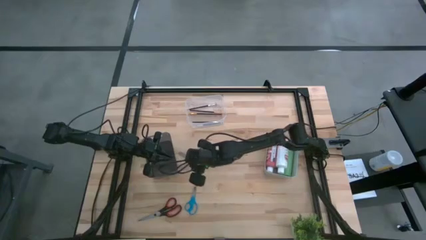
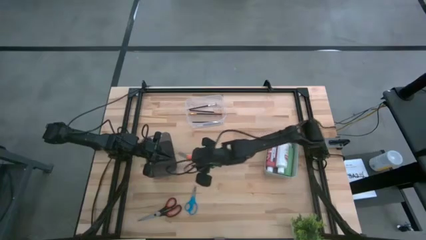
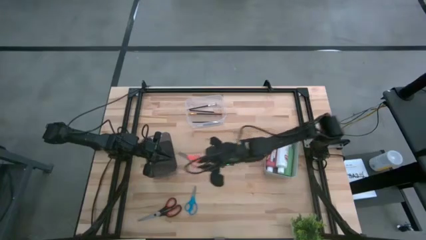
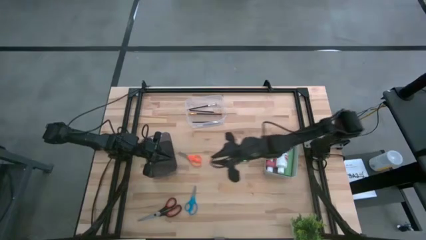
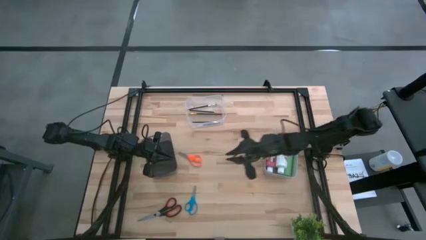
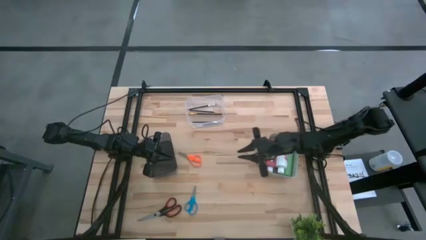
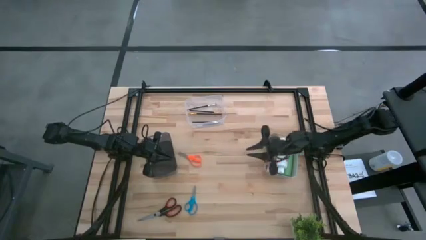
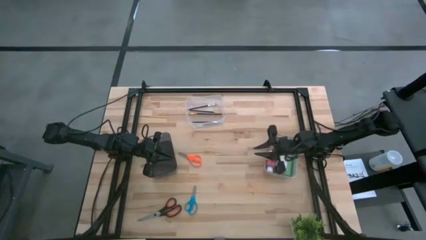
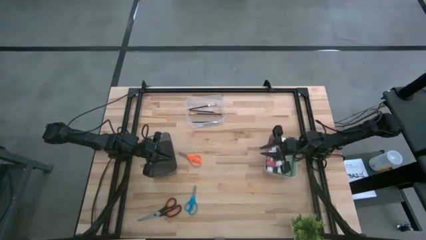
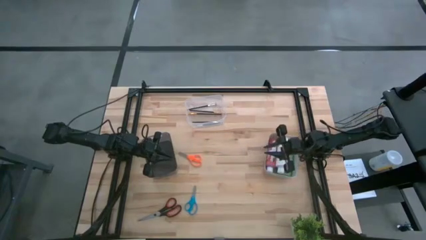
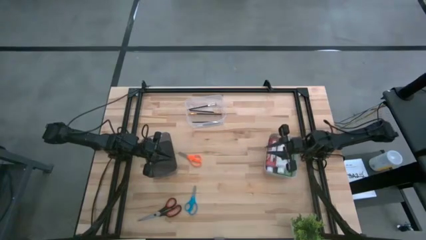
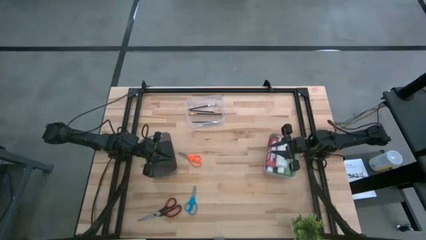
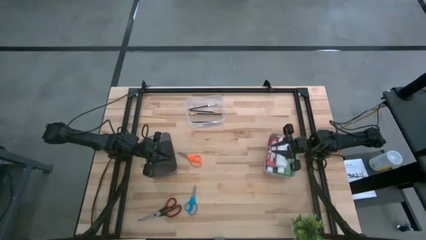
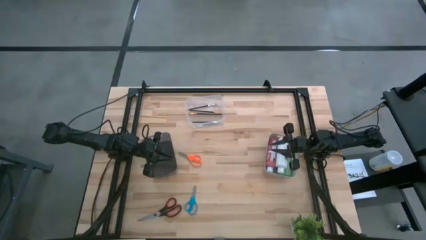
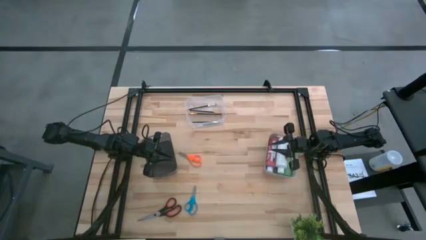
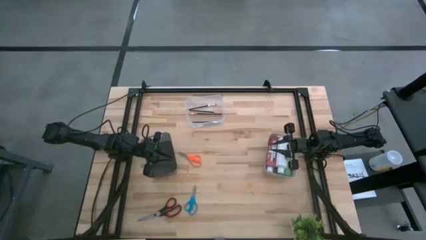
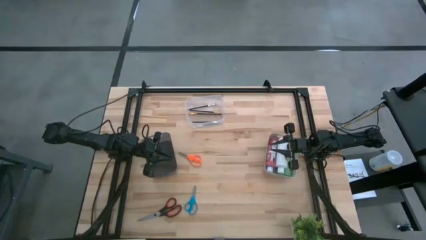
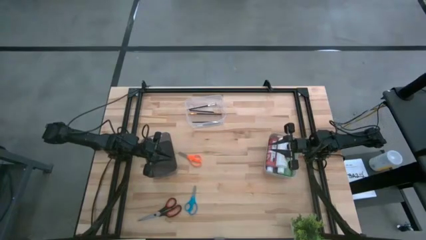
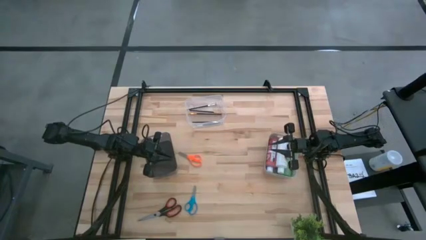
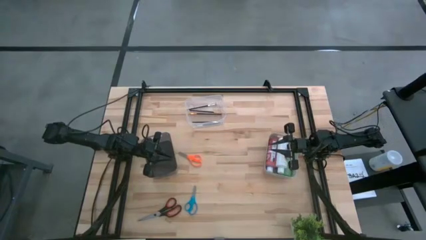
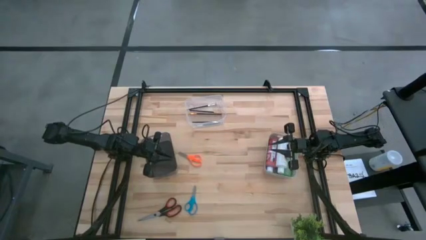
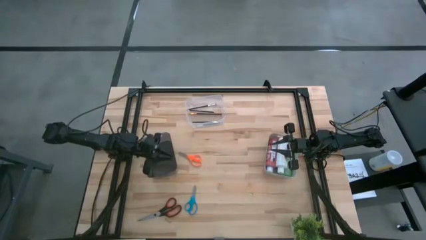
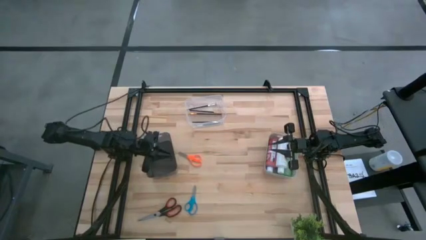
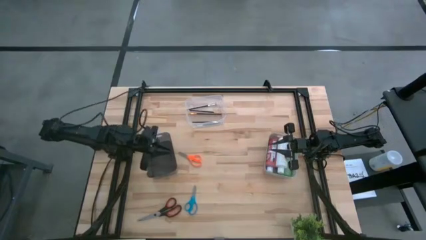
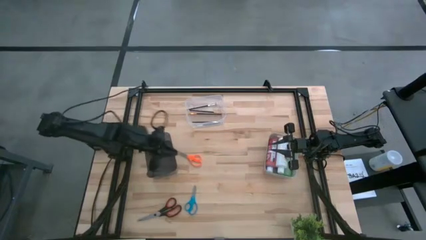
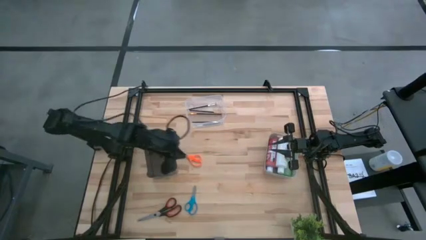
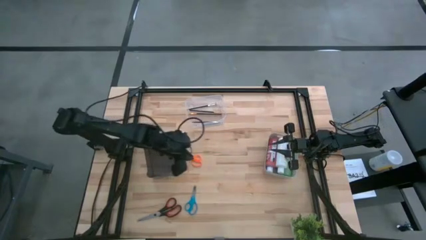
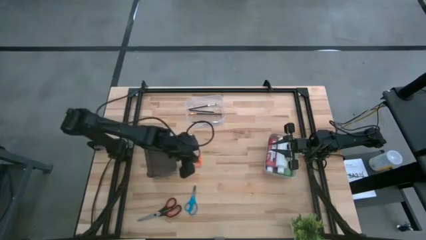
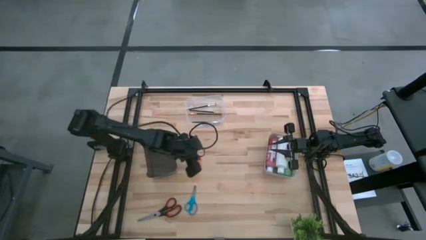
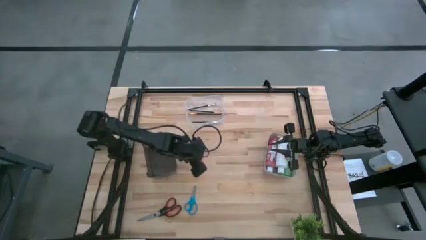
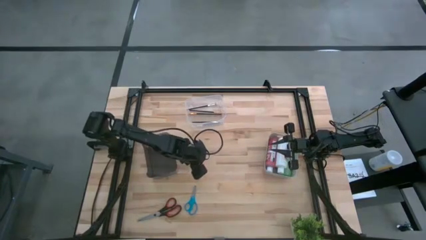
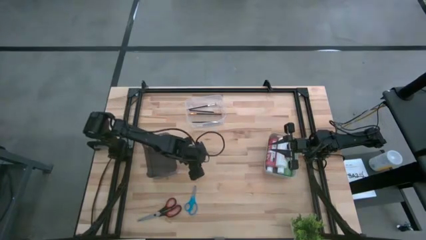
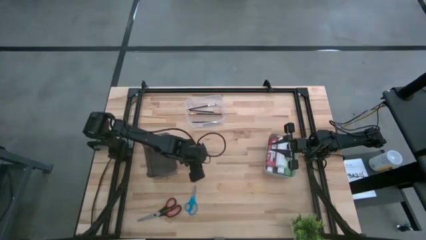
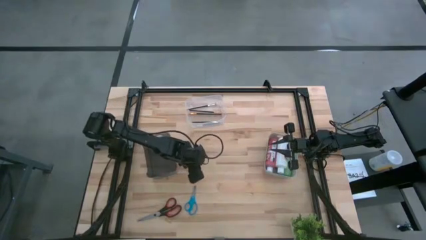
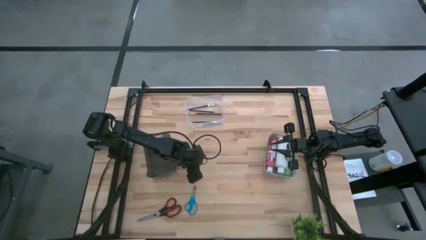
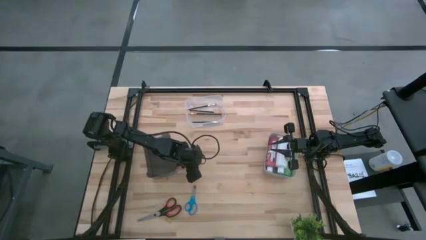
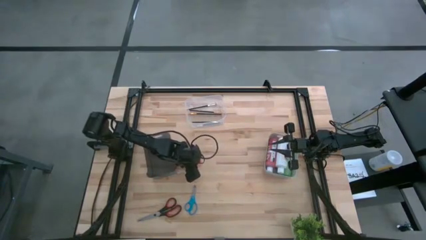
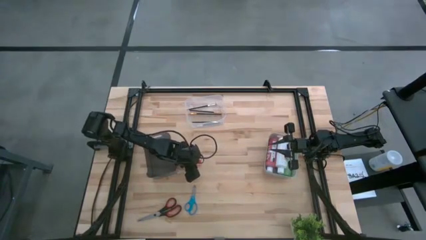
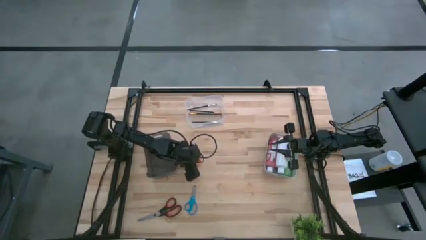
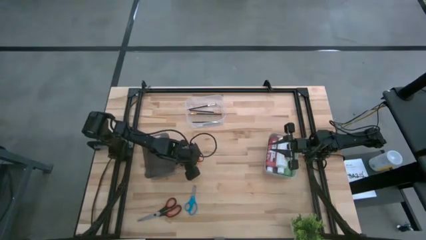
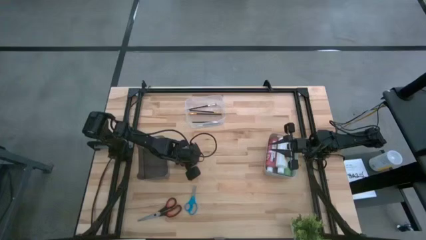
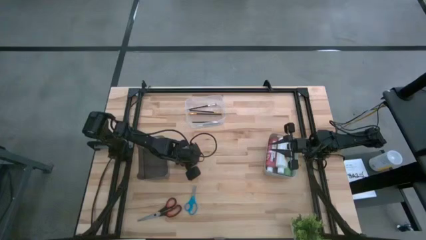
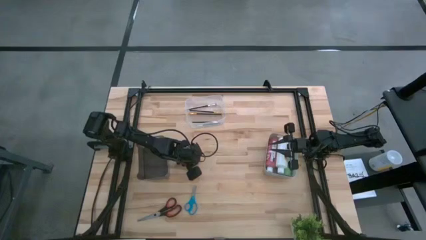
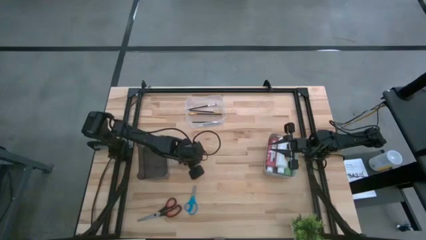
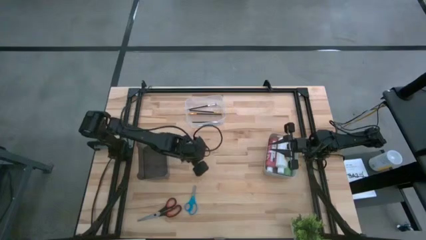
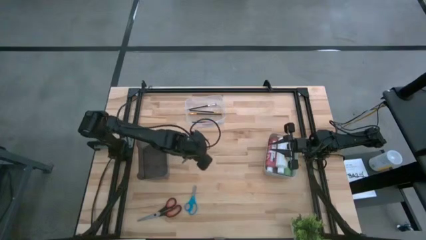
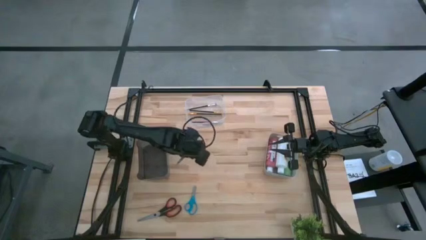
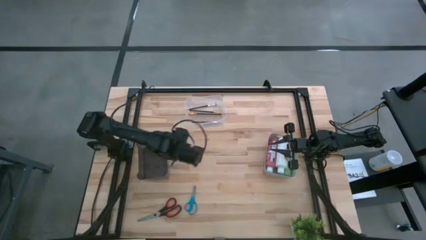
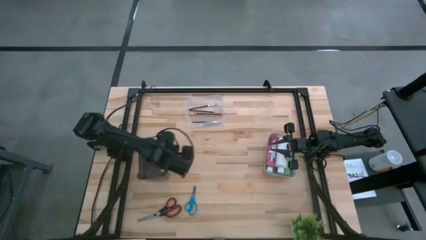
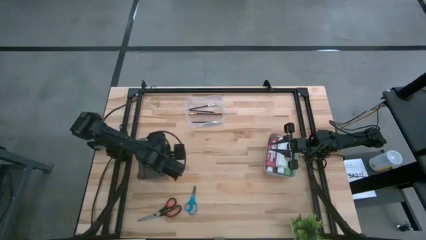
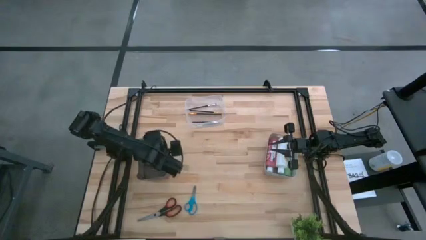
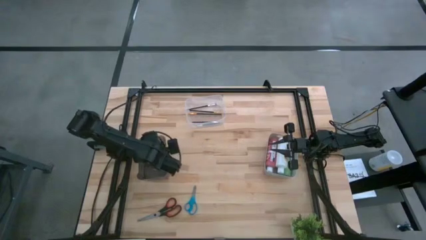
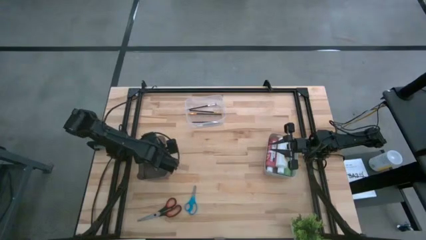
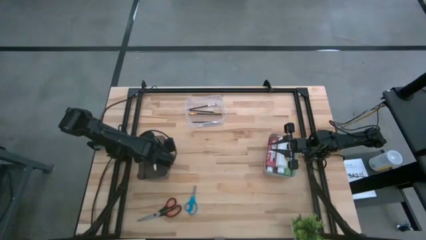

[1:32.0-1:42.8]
Task: Pick & Place Paint Supplies
Put the orange scissors into the black bin

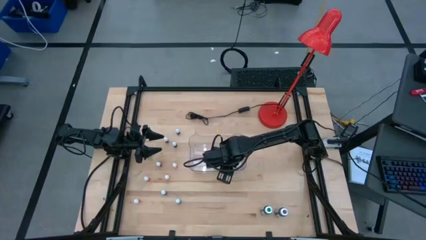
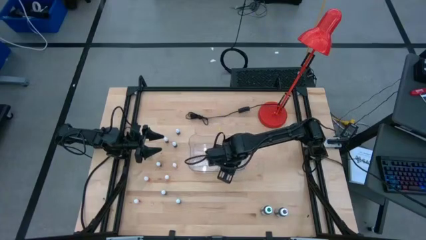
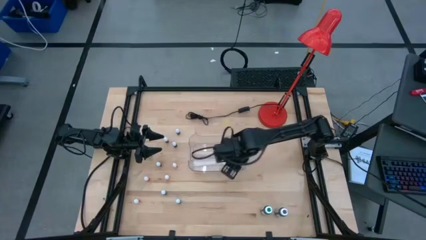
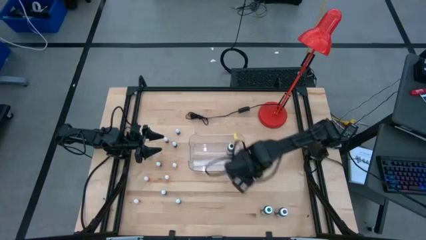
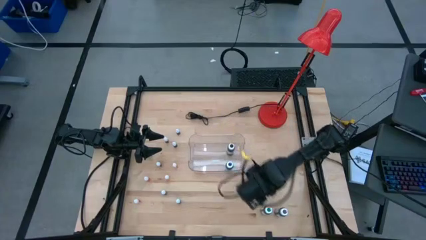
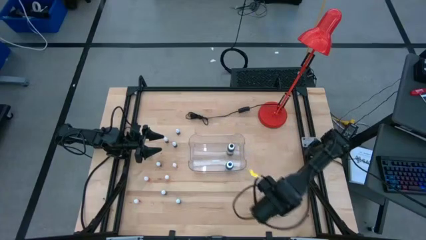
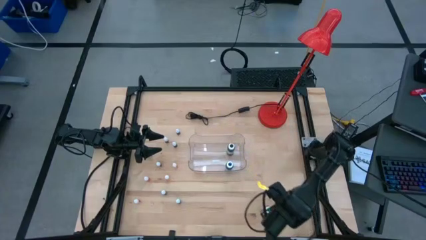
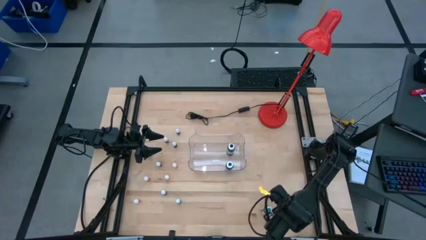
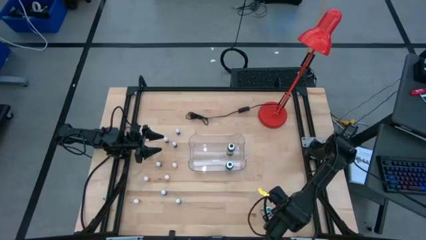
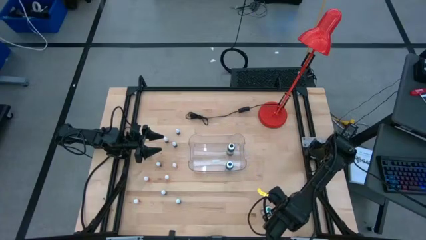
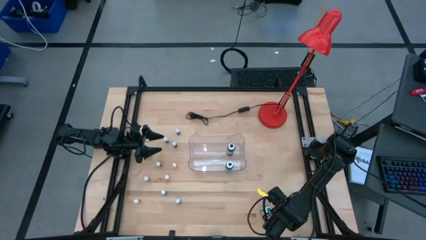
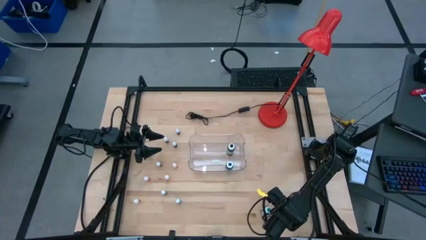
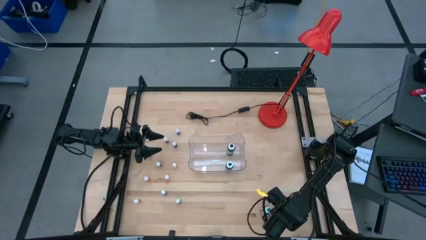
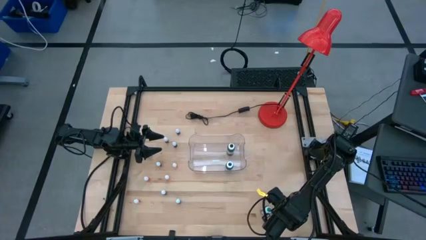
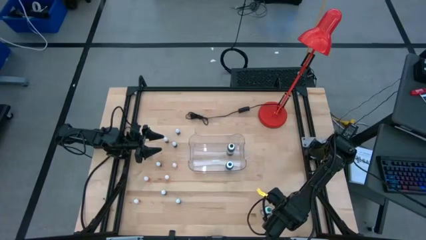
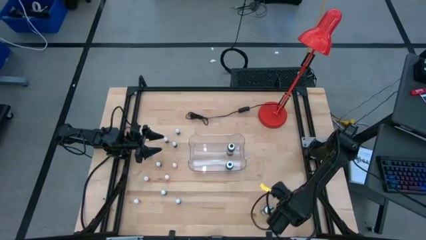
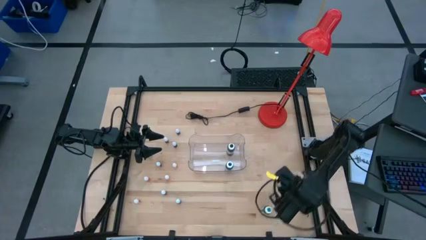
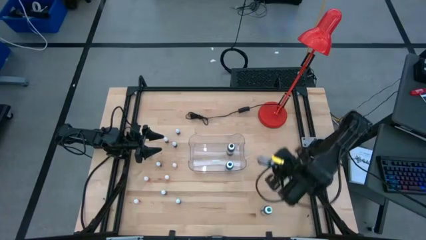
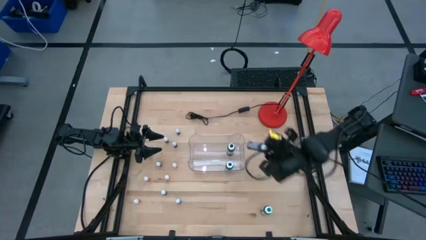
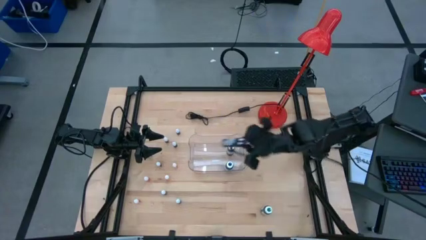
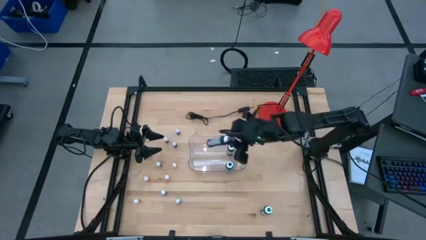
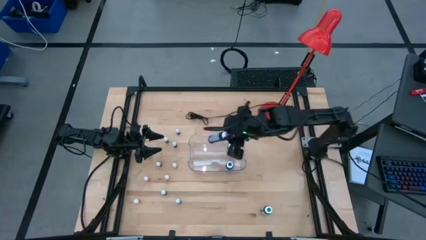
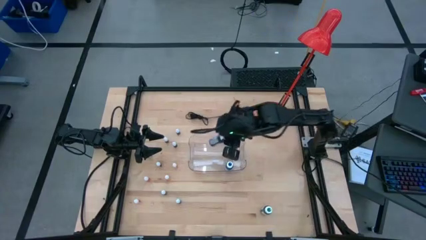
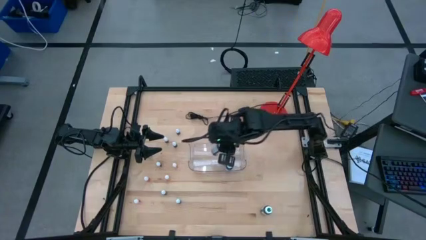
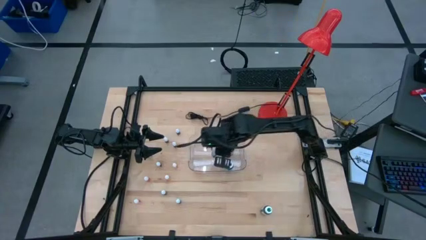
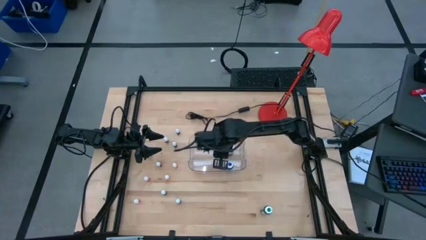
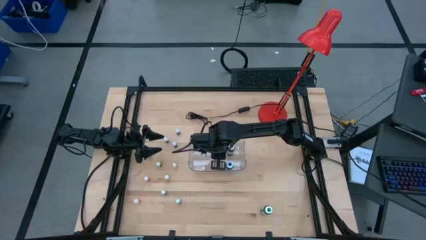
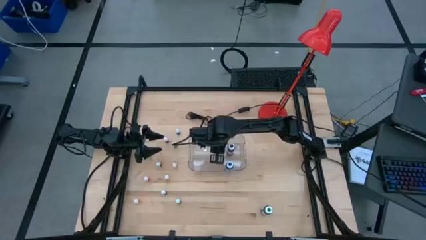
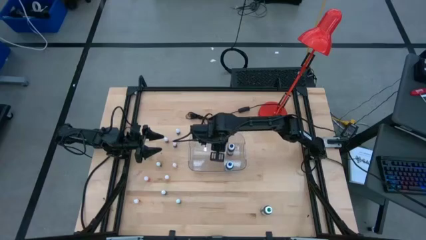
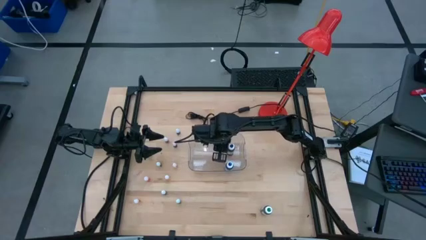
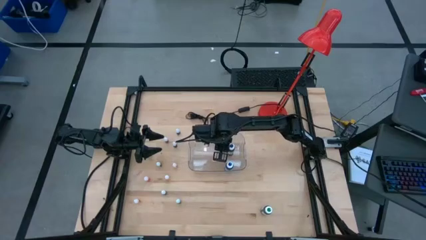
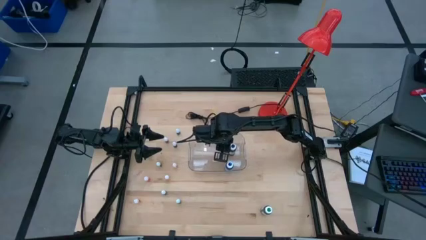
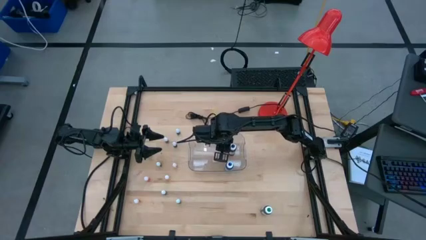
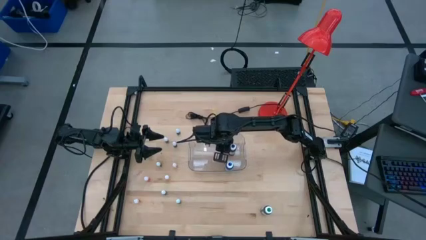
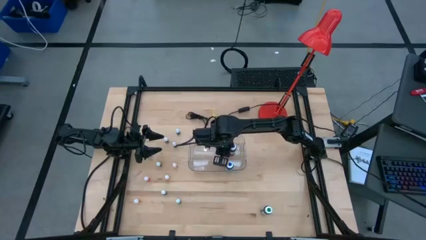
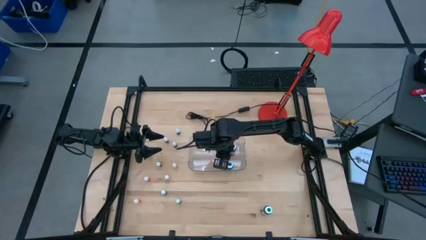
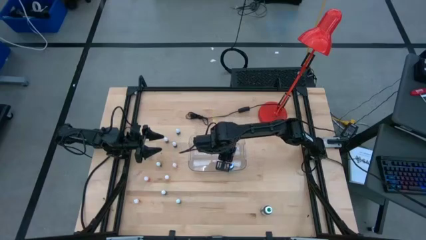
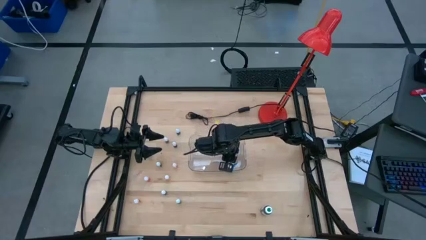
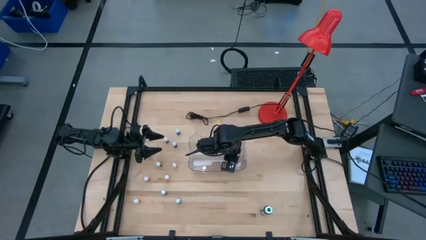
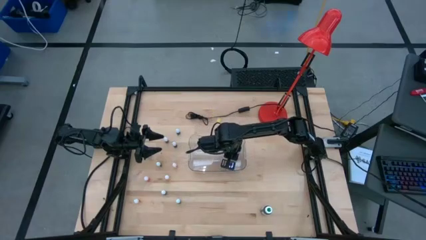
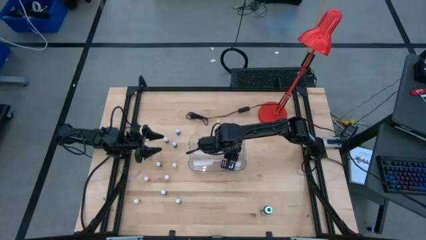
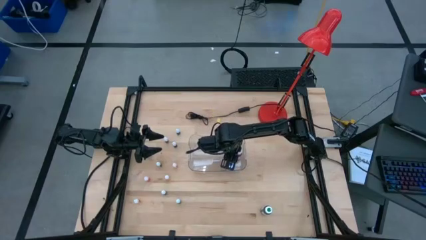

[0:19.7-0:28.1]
Task: Pick & Place food coloring
Put the large violet food coloring bottle into the transparent bin
